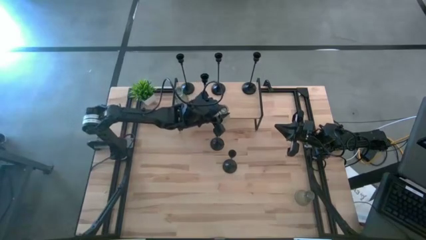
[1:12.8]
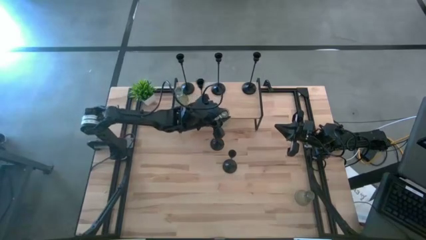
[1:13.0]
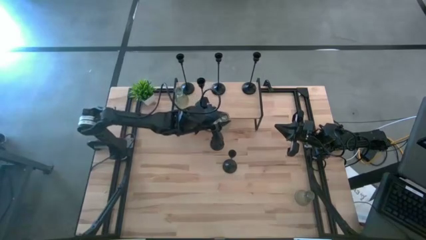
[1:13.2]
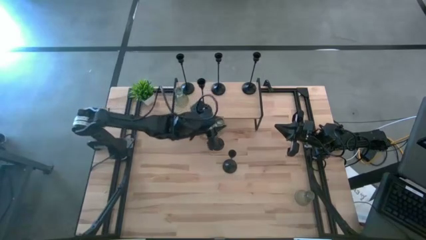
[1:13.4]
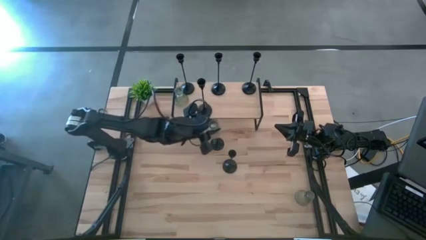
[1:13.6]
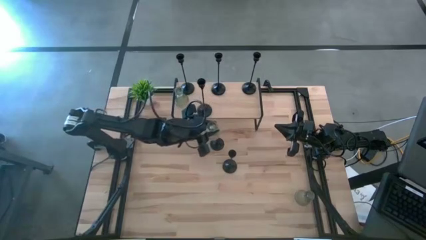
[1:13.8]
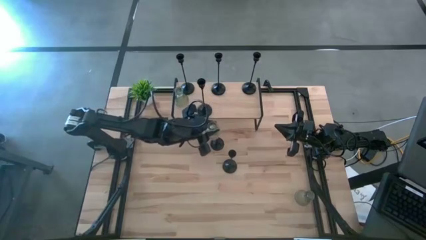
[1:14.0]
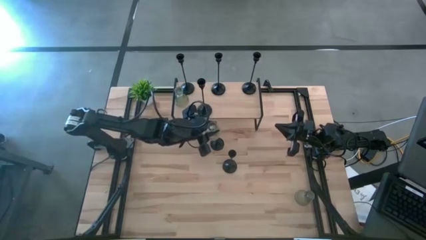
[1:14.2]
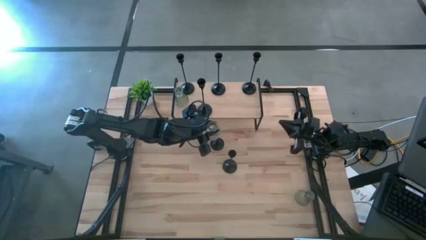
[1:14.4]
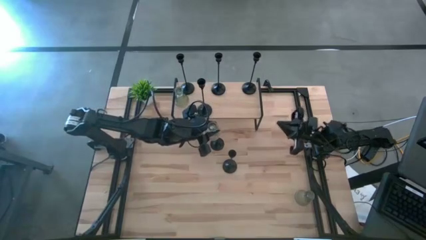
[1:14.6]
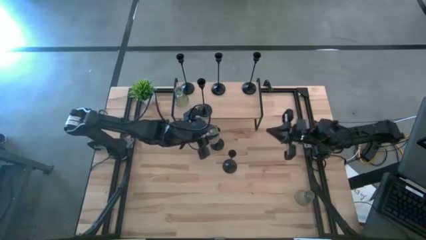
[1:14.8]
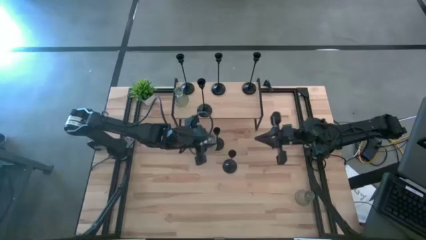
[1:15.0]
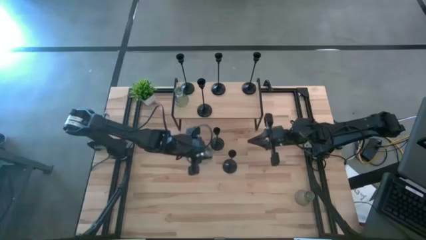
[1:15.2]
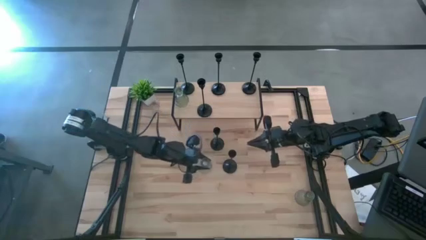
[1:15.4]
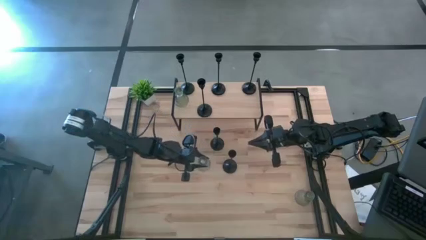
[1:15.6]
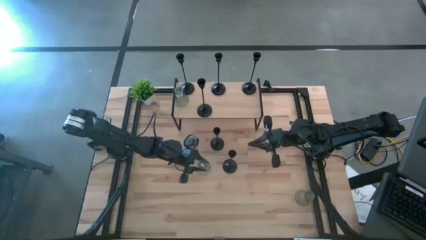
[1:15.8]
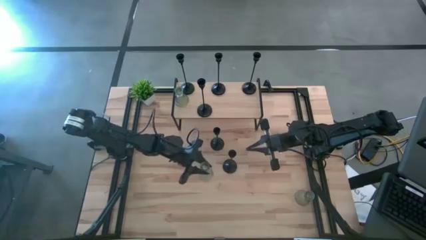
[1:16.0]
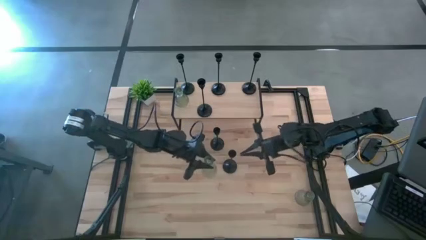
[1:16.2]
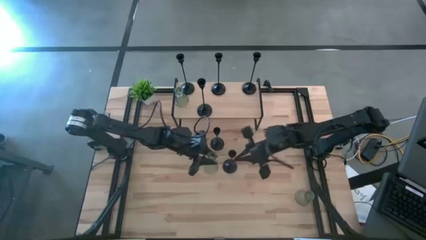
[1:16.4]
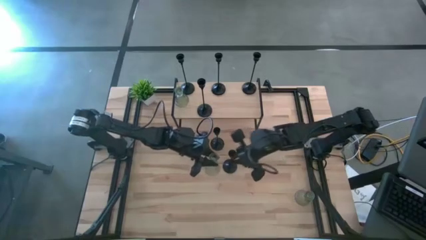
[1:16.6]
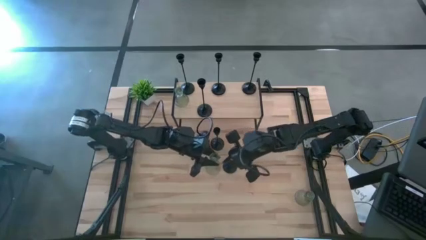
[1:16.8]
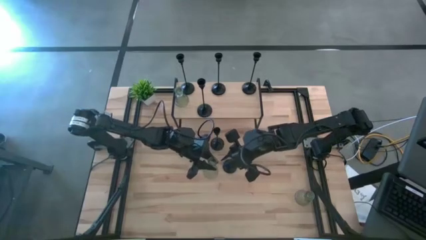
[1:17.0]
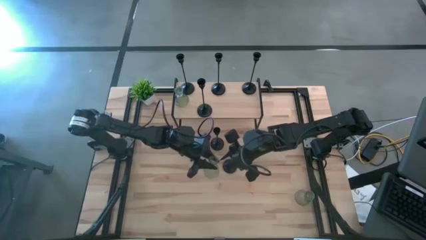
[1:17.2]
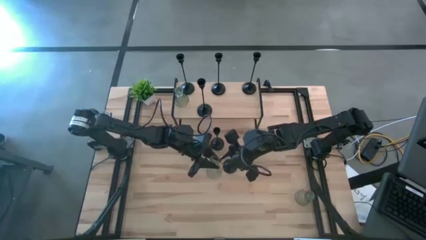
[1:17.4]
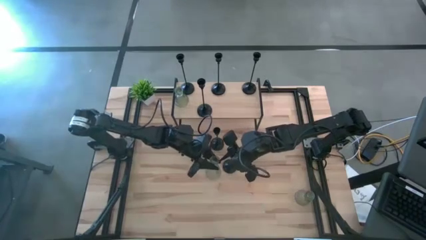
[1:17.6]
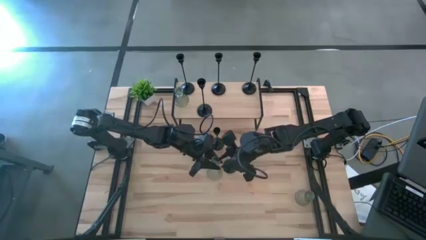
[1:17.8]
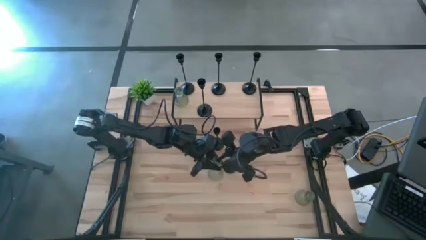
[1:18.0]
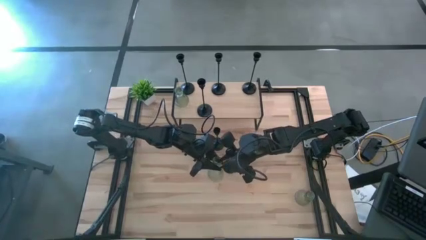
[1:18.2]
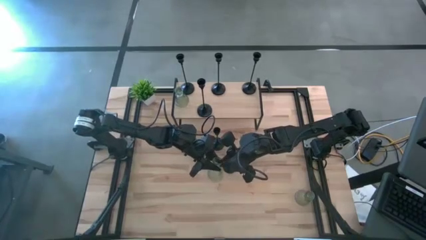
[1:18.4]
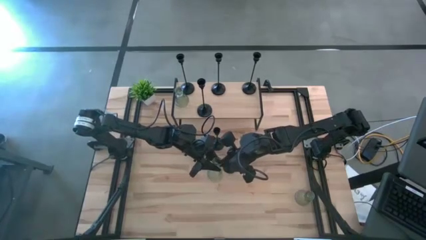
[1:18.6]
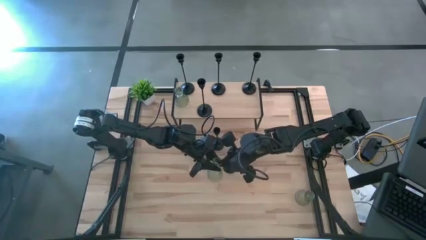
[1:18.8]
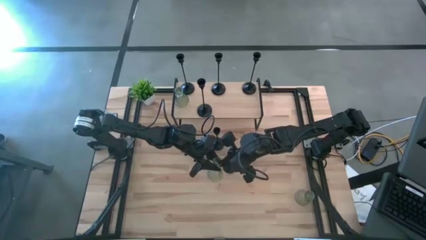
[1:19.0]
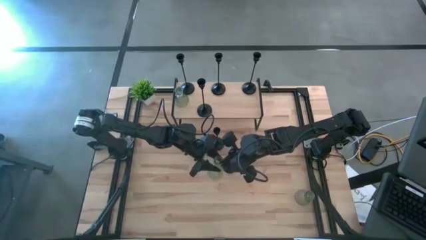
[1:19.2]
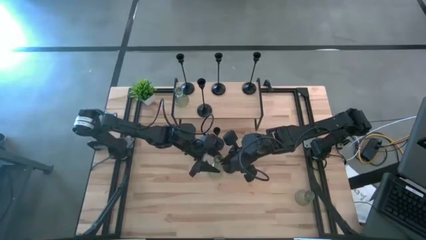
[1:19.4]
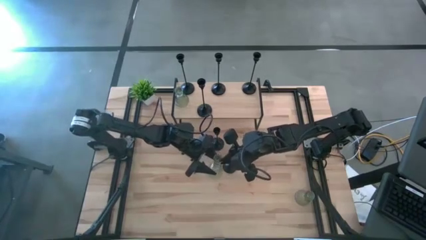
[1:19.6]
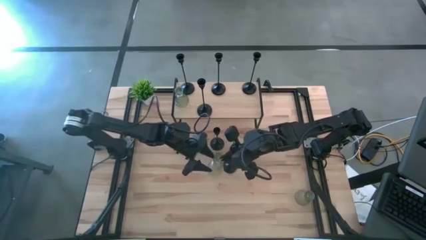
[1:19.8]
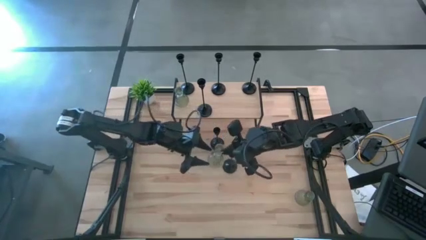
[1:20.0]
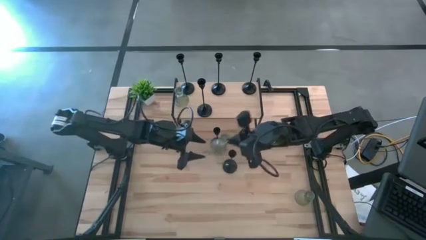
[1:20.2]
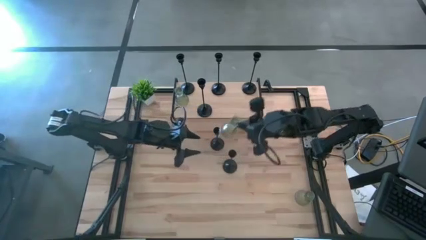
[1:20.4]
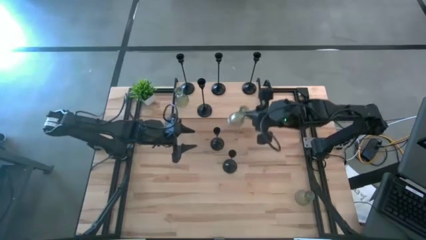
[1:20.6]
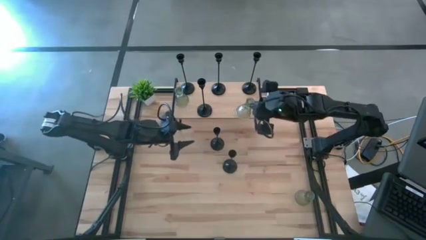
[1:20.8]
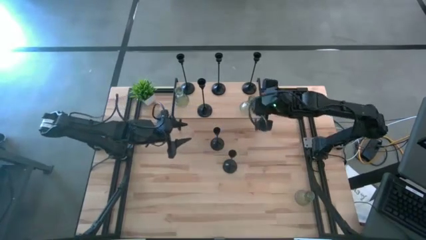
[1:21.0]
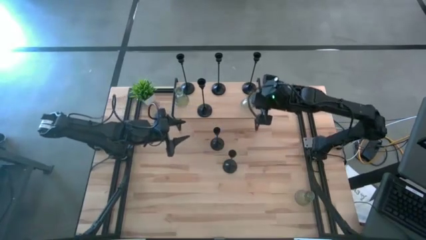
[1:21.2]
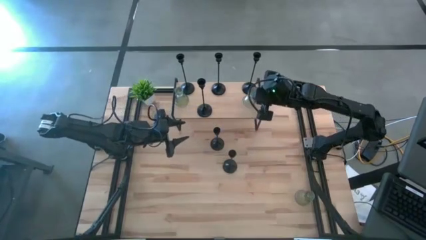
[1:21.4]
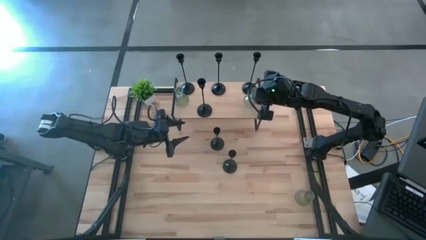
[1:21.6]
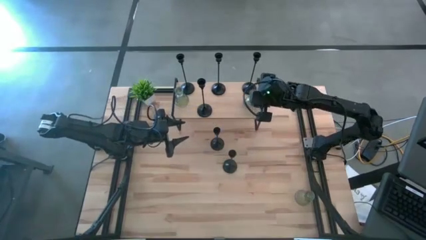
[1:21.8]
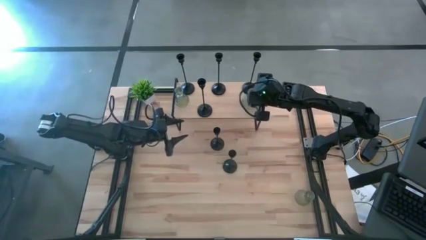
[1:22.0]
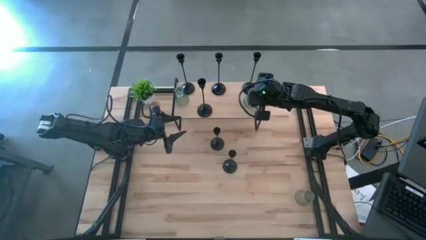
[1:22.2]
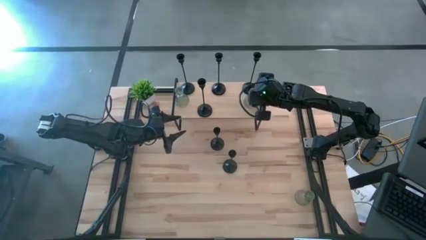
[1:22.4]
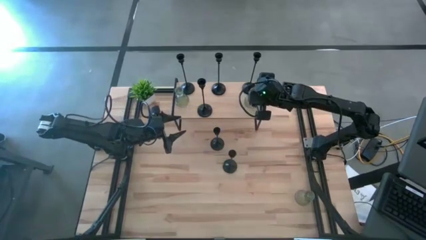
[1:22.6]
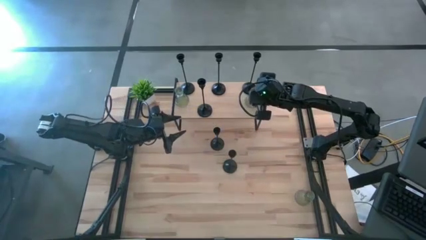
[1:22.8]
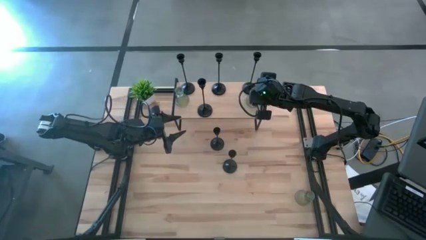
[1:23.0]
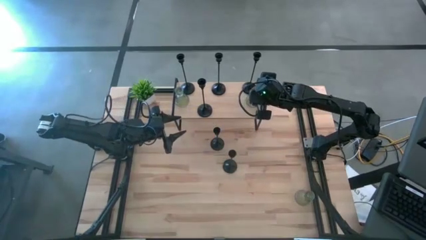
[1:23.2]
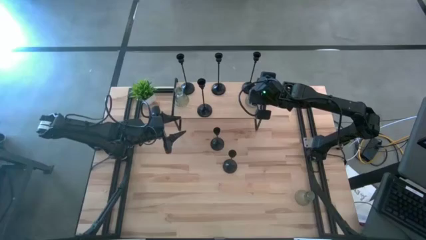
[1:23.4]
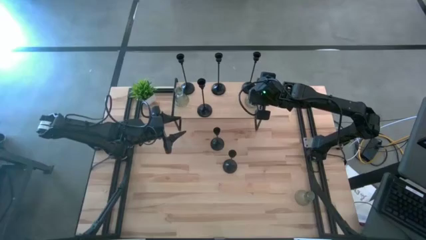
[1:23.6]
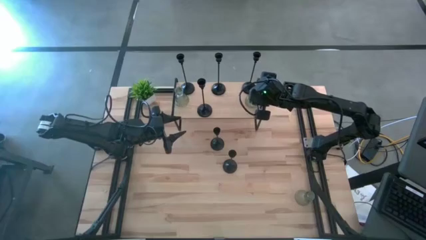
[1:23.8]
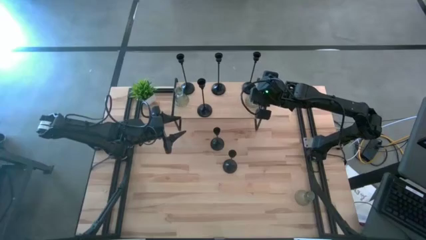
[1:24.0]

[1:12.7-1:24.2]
Task: Pick & Place candle stick holders
Put the green candle holder on the shelf

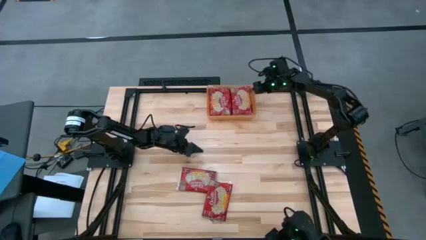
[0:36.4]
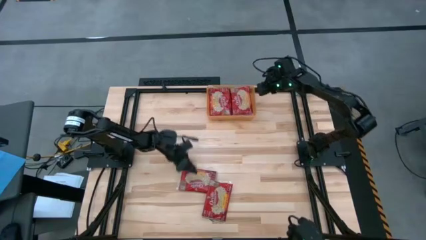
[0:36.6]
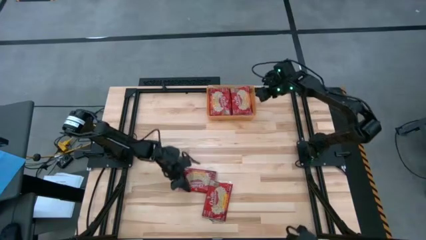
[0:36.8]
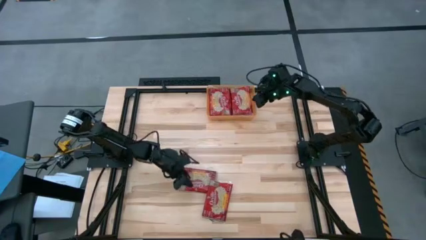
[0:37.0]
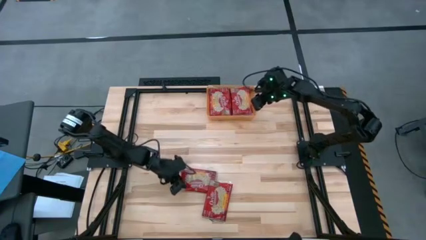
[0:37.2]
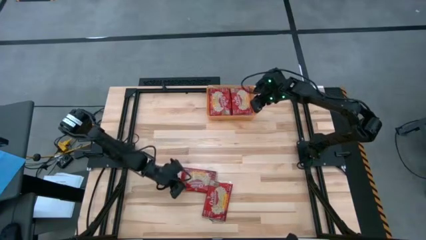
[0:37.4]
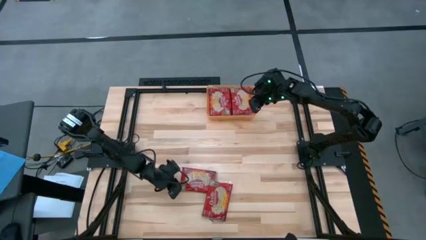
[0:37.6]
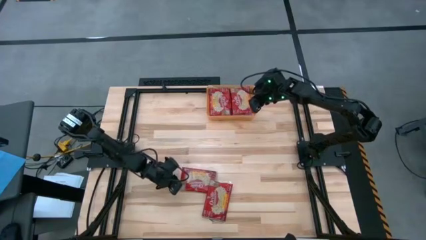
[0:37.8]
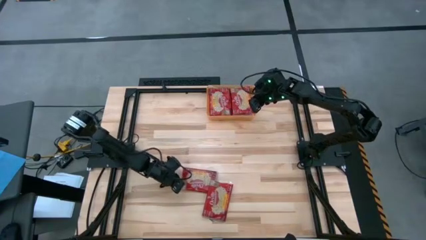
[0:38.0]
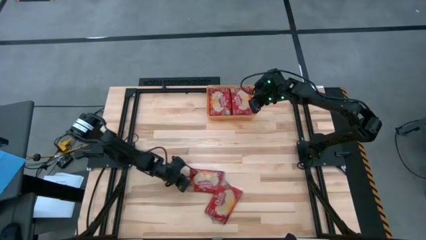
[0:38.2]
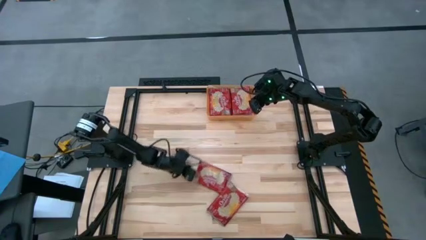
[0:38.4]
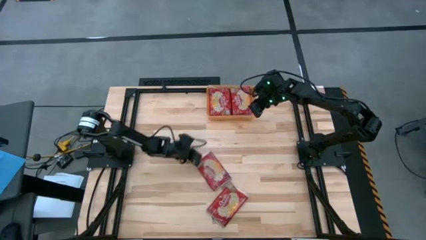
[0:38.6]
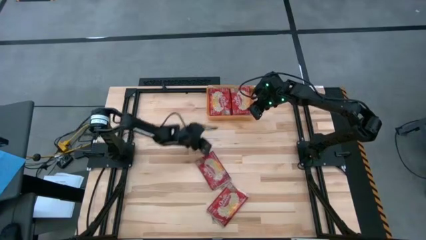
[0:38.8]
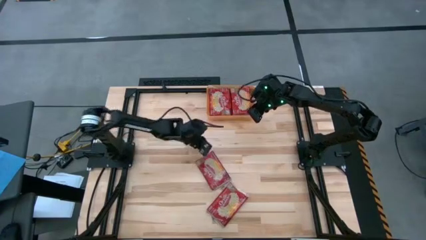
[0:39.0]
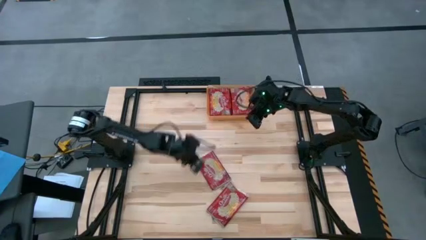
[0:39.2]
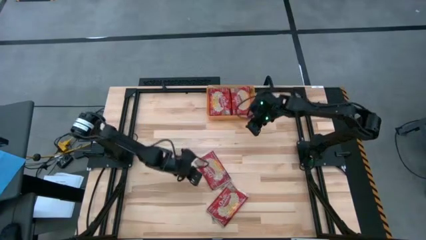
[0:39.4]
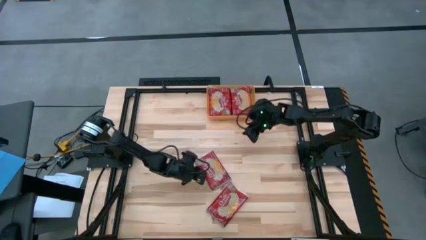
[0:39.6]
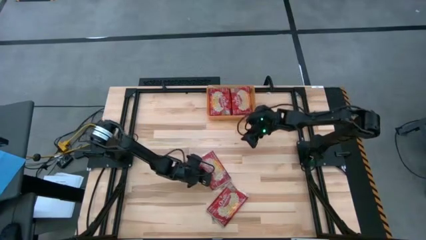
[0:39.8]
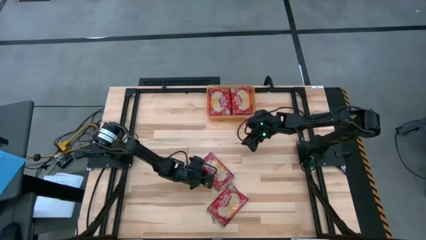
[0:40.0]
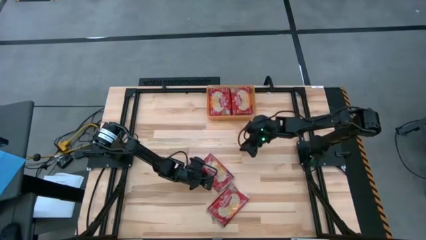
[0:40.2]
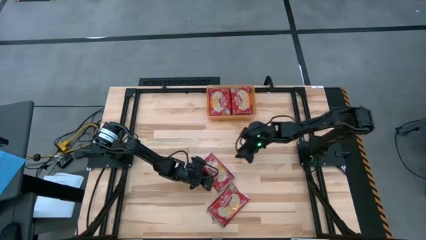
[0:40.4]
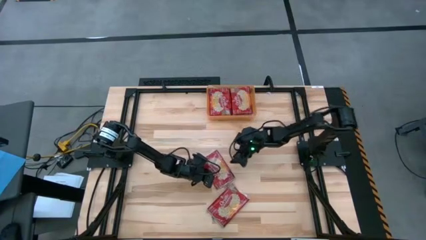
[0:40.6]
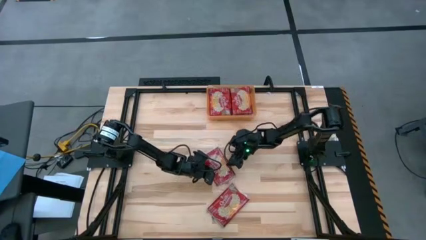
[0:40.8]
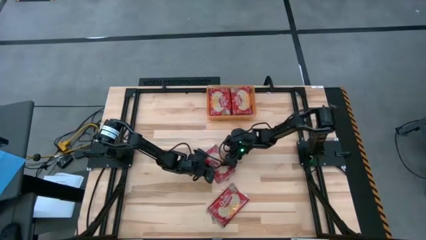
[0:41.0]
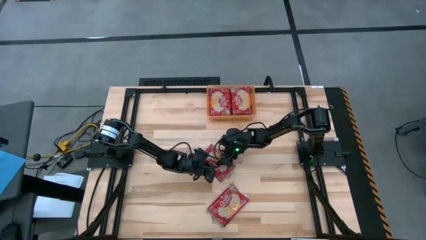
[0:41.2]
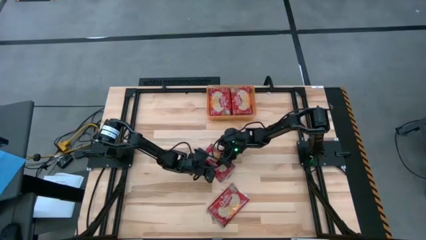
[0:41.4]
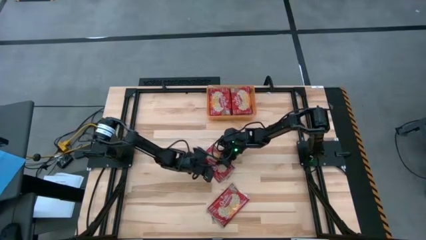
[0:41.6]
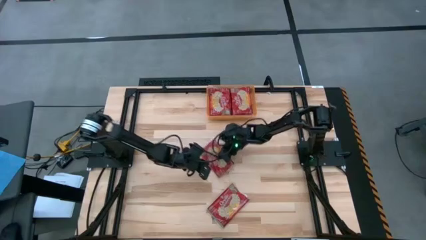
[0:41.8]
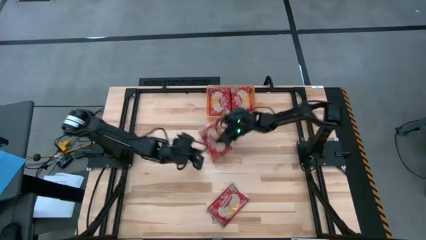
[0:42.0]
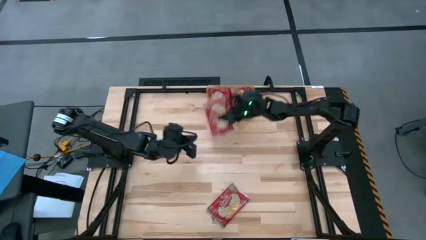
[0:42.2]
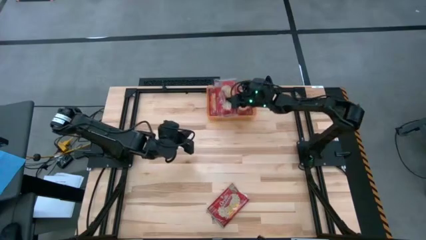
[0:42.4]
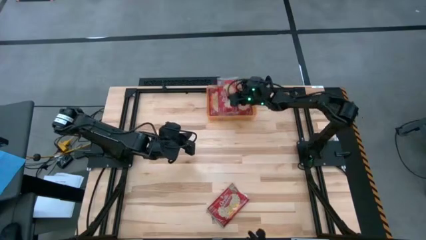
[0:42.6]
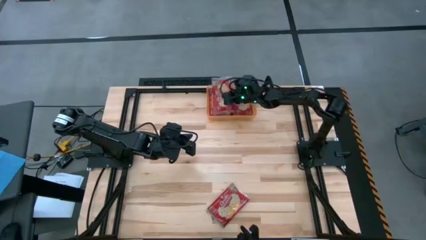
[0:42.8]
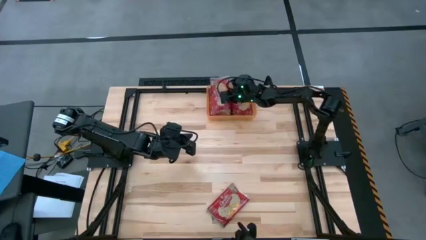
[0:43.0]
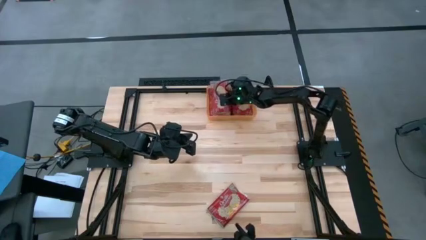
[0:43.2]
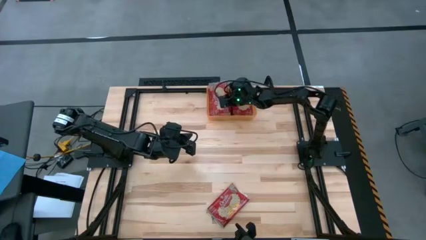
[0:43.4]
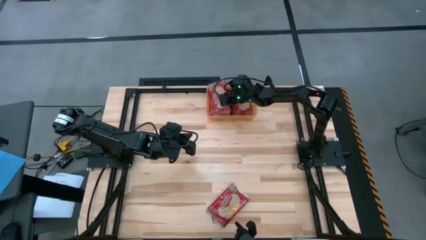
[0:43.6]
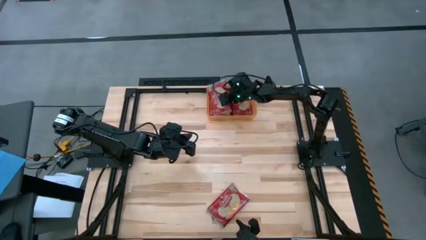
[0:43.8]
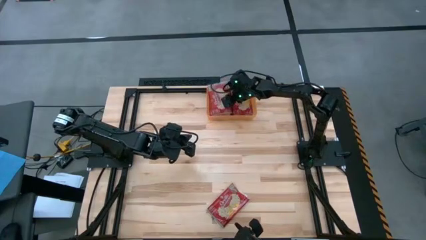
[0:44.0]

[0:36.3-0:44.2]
Task: Sort popcorn bags into baskets
Put the red popcorn bag into the orange bin
